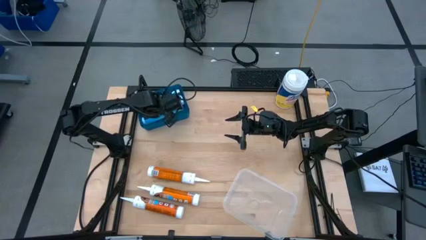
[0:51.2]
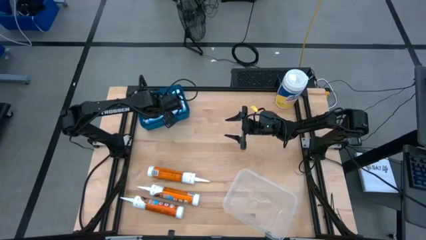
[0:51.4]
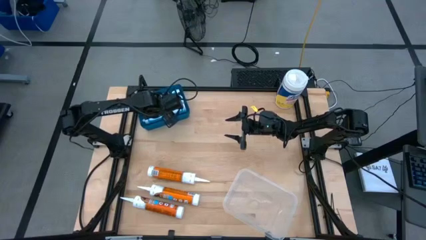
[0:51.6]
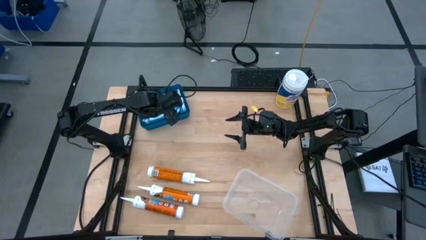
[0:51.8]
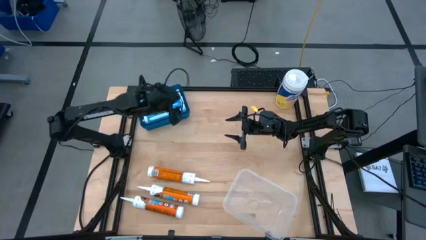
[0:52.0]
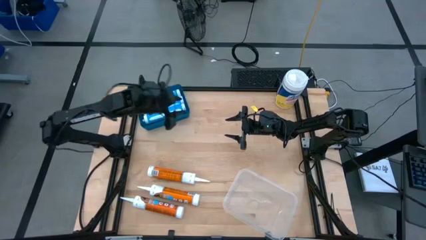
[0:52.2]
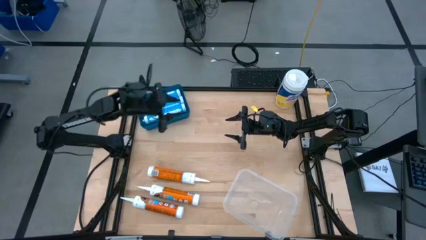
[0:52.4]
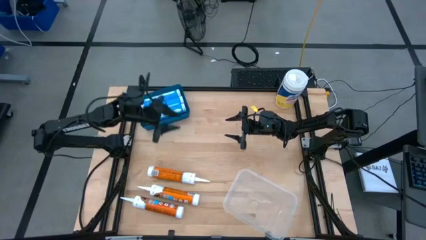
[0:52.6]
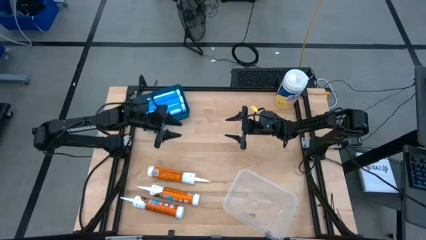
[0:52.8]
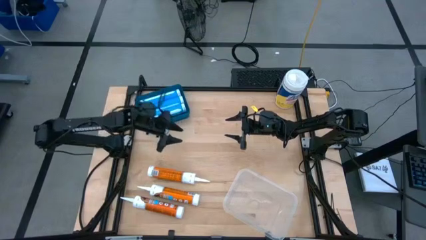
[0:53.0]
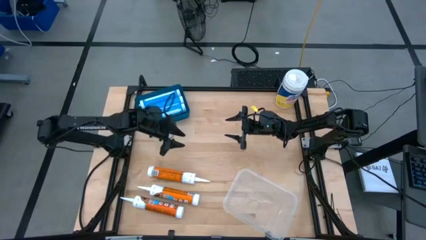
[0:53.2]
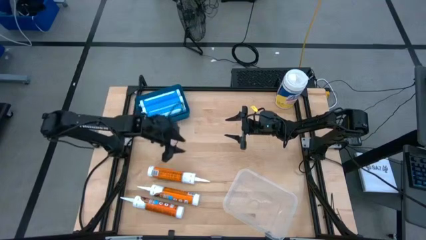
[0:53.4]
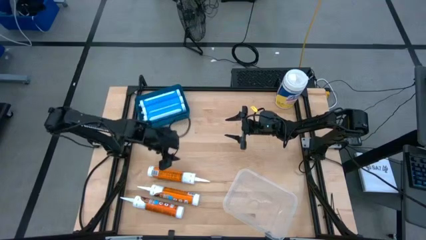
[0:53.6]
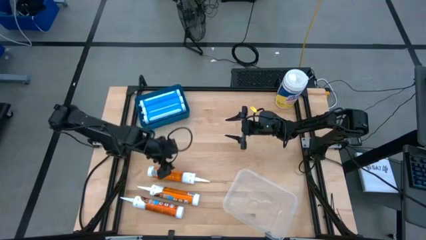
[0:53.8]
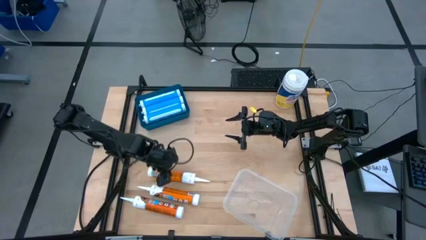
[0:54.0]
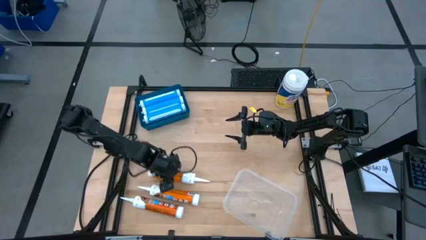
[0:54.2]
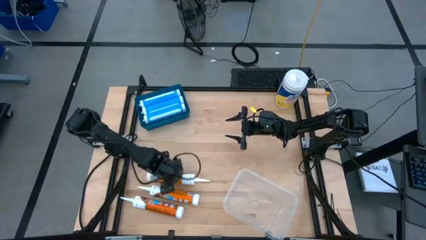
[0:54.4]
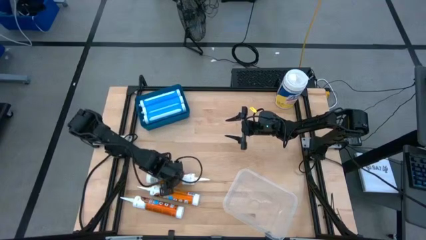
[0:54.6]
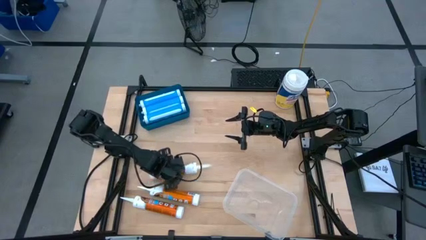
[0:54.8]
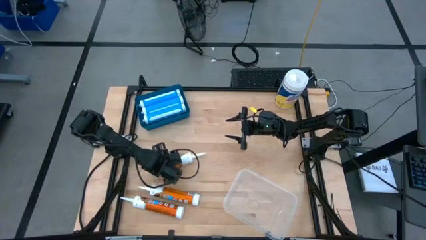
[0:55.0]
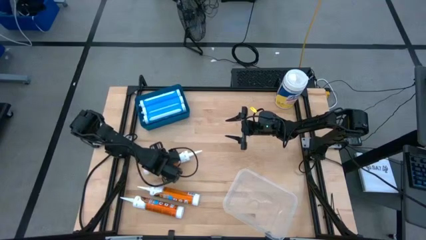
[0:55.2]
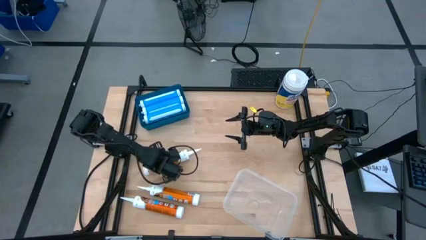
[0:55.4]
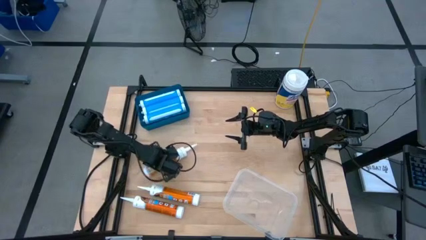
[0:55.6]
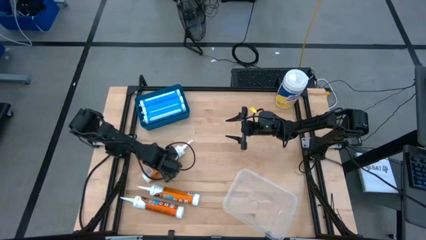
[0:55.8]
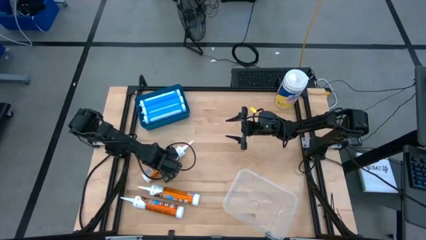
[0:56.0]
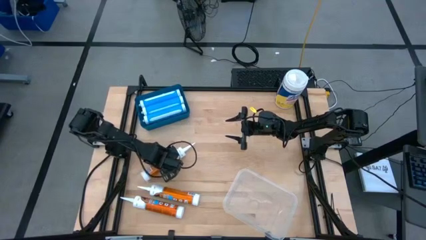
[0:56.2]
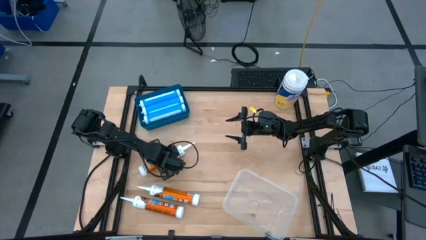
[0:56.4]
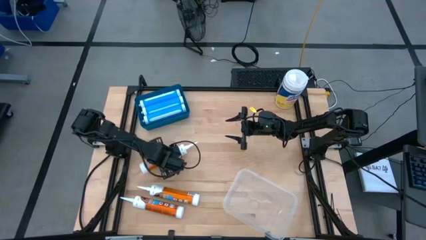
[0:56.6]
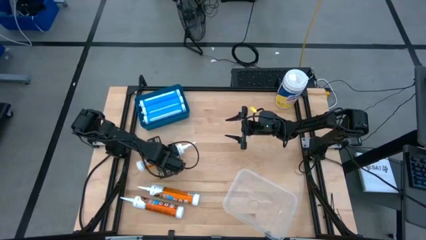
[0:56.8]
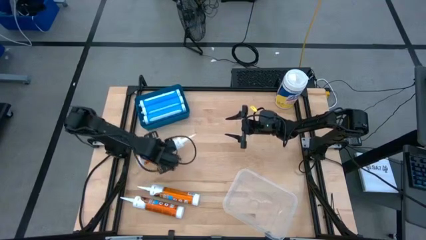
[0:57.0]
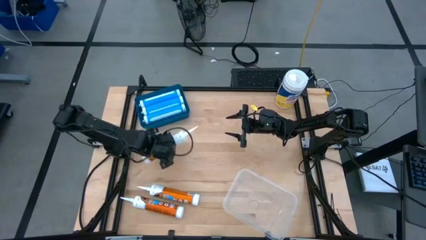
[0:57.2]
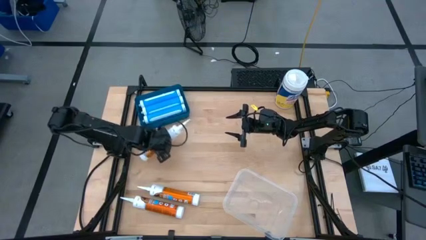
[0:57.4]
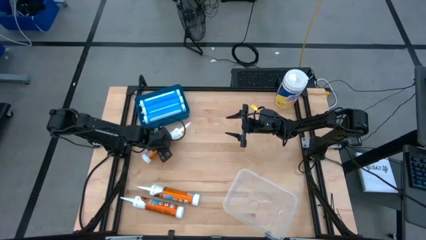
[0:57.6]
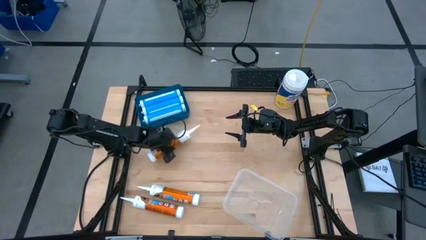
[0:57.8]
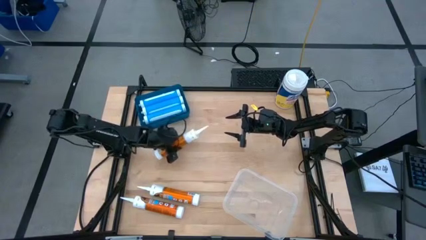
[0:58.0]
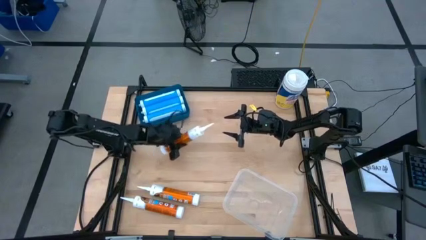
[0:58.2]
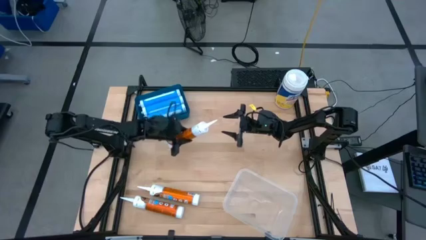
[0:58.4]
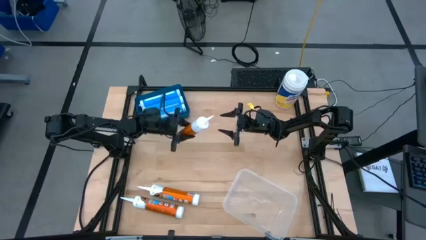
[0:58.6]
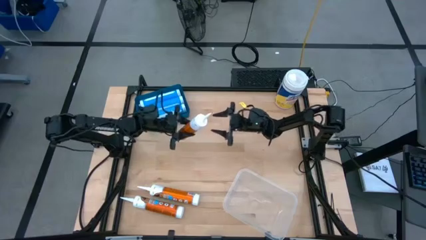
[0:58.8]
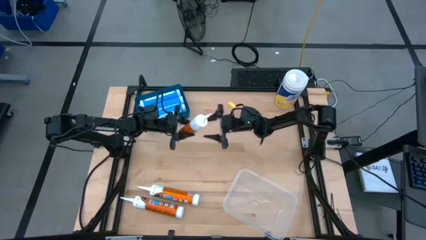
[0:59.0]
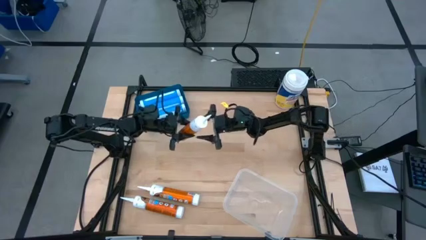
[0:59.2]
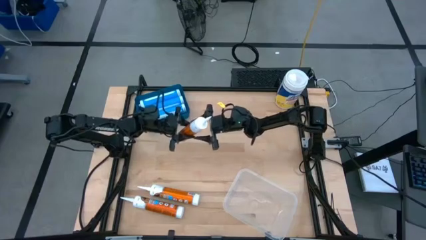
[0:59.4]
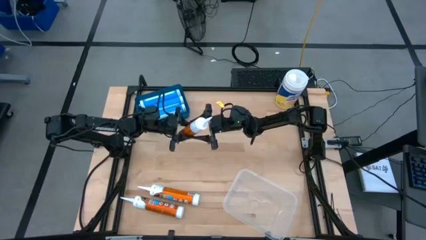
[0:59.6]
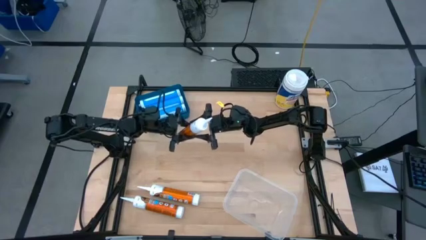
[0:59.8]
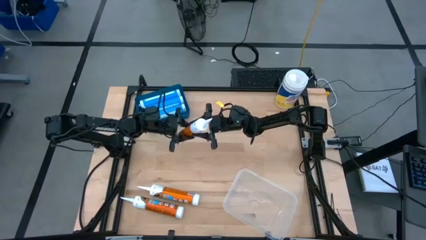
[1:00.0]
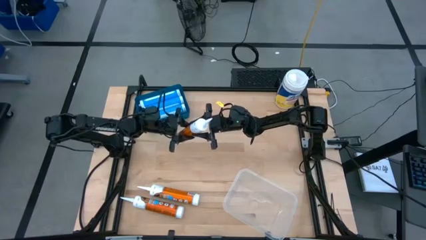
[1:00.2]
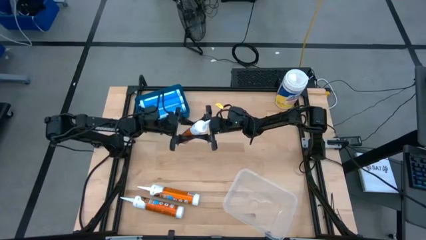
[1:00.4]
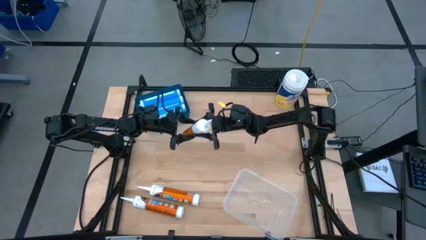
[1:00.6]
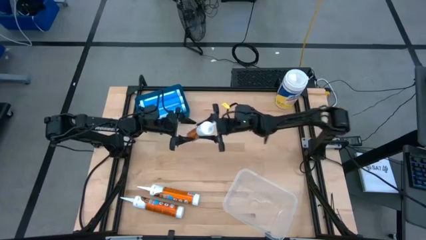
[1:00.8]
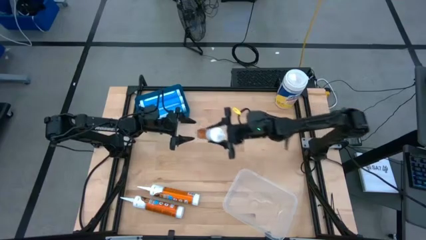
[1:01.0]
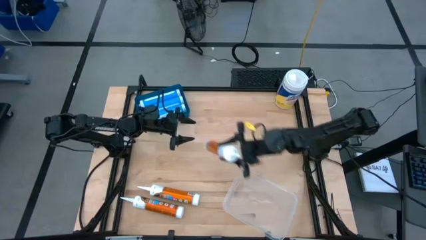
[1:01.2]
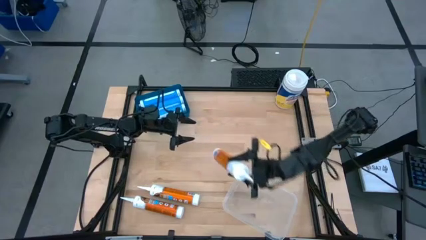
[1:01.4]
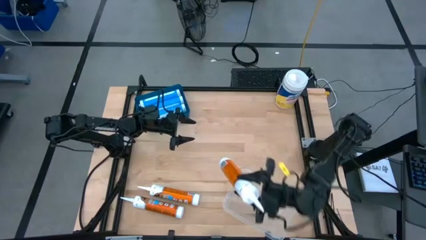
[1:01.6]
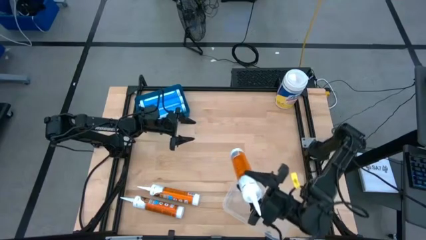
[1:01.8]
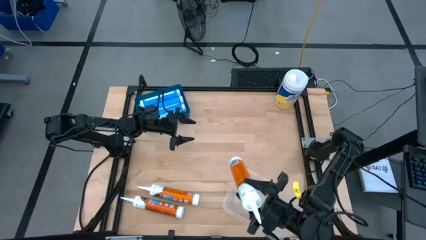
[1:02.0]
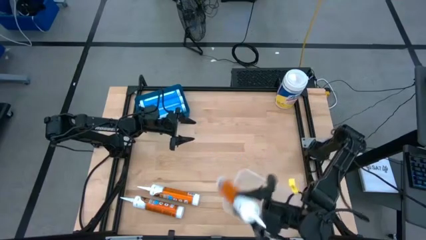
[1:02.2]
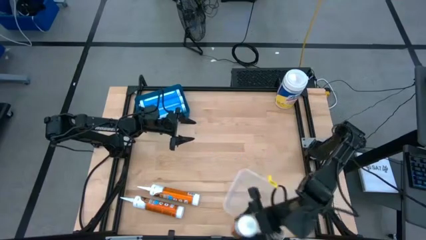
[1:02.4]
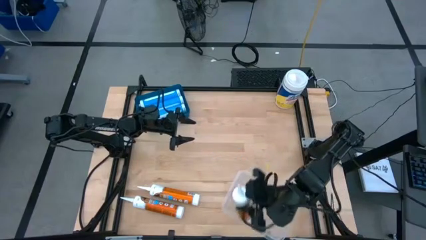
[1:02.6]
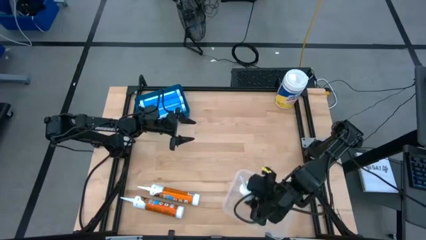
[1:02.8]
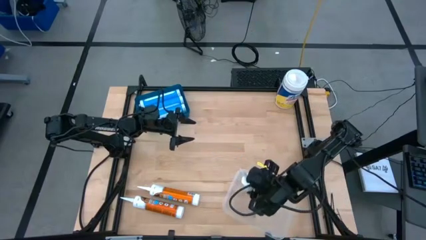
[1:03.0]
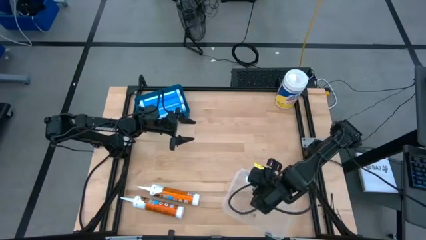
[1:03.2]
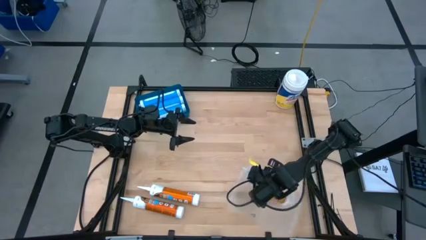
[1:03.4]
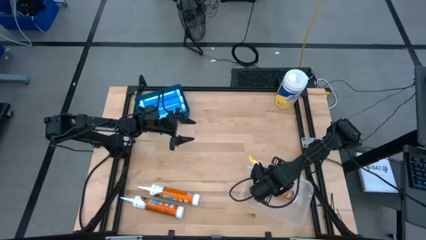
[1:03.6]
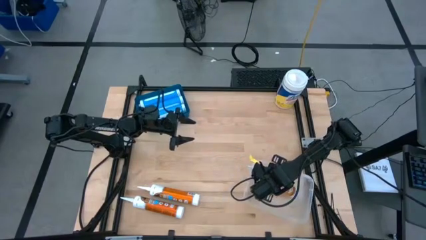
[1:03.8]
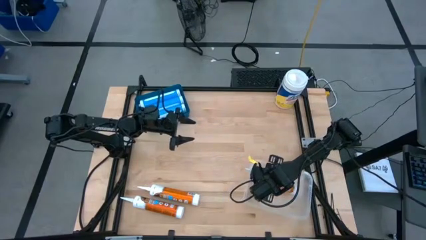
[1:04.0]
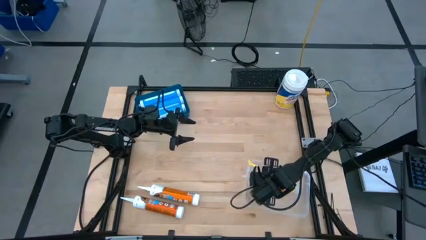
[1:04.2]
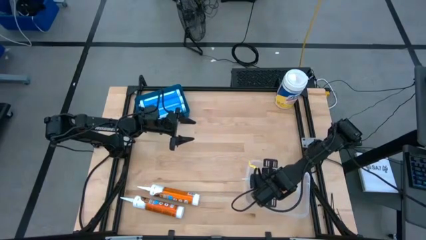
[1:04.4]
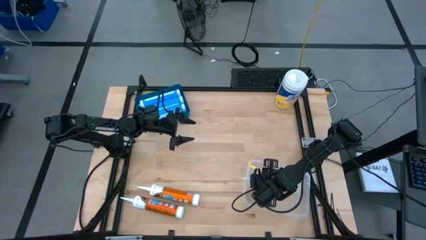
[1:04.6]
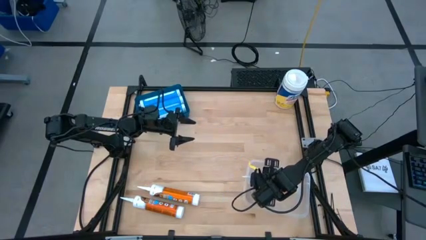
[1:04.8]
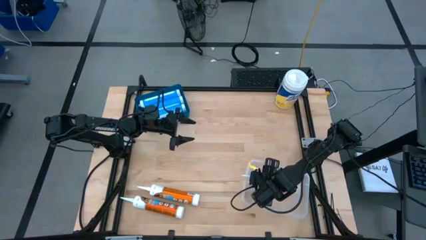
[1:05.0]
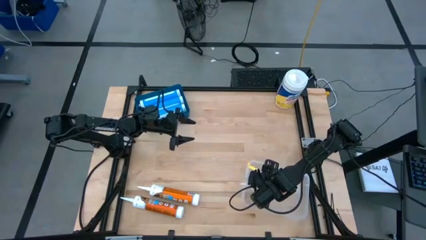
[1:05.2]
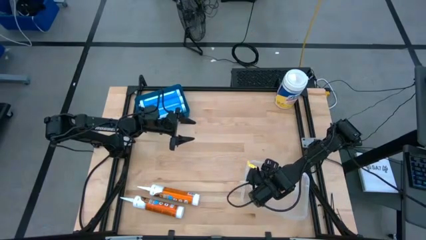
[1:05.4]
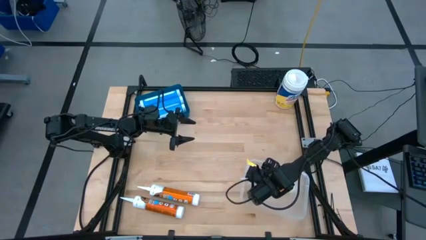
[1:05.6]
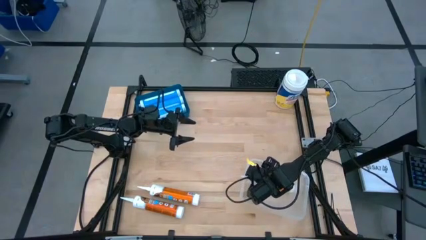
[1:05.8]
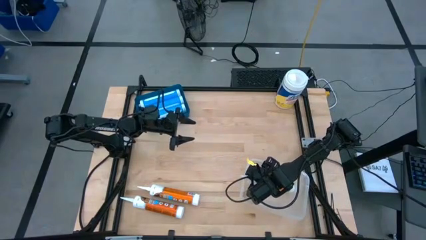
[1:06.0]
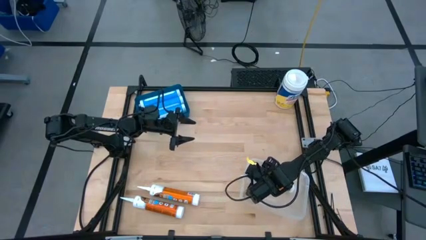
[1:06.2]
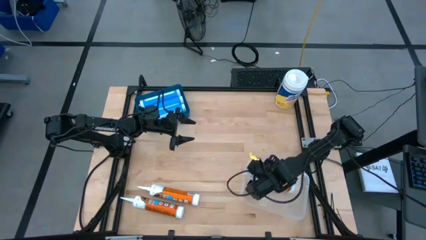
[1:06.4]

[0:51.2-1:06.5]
Task: Pick & place silicon tubes, Sealant and Lysol wipes
Put the top orange sealant into the transparent bin
